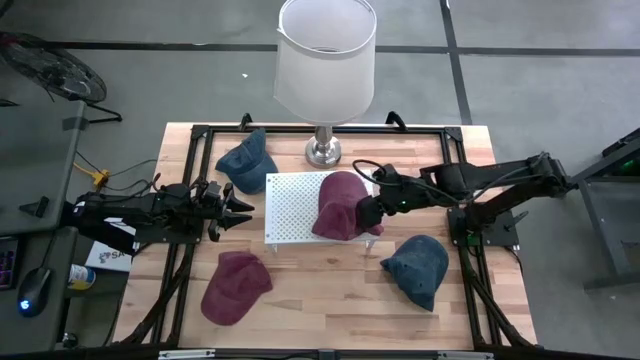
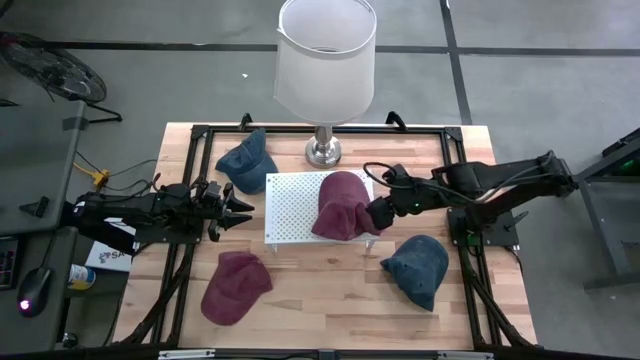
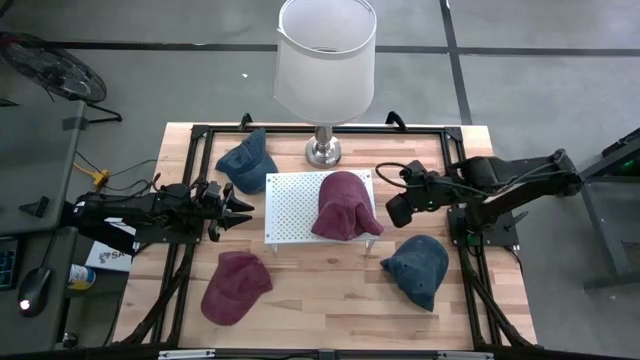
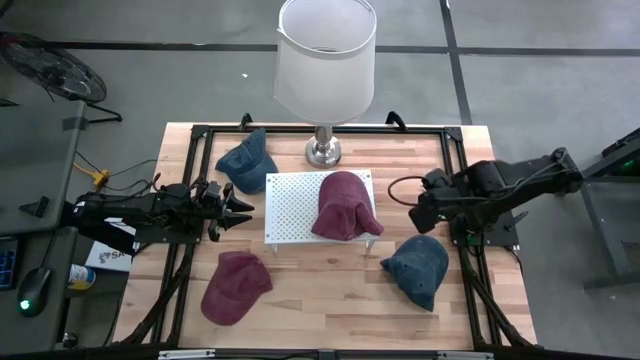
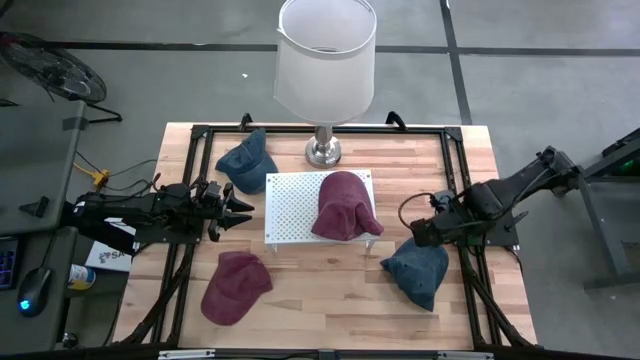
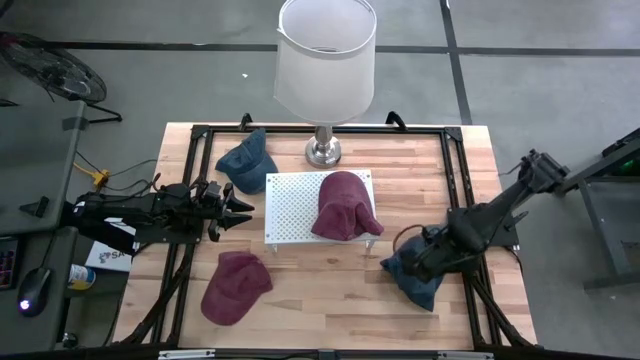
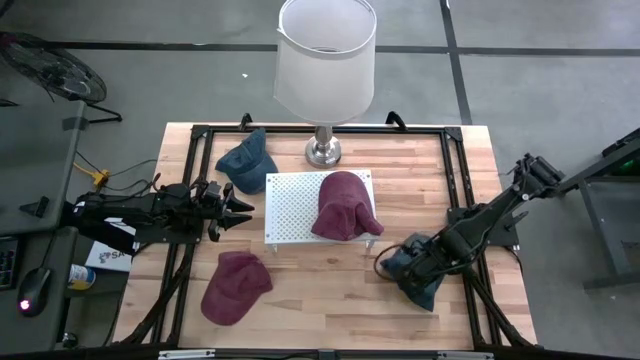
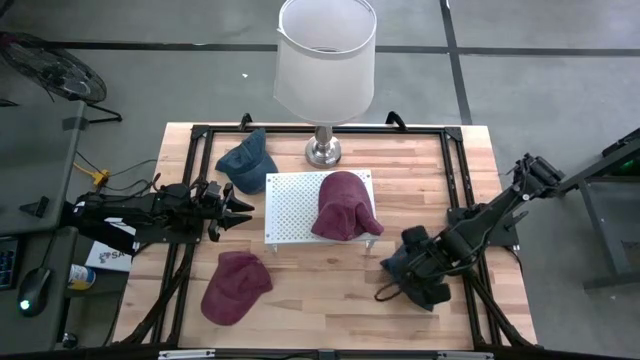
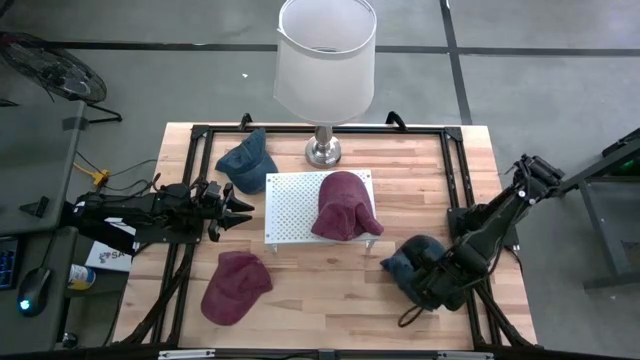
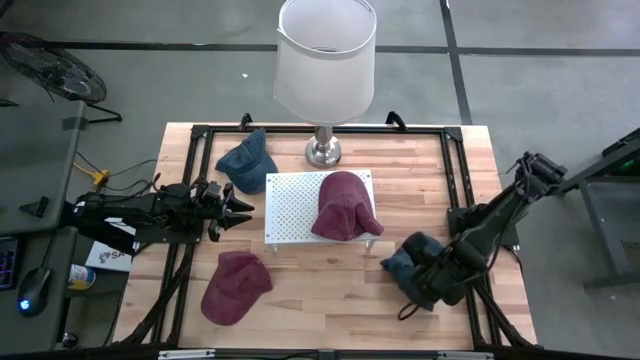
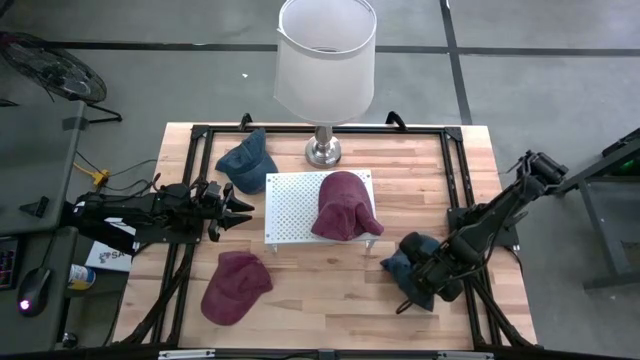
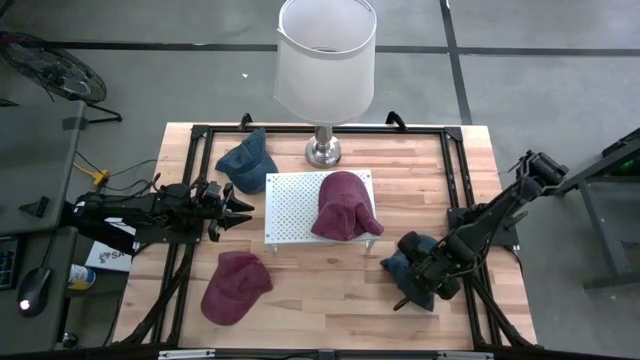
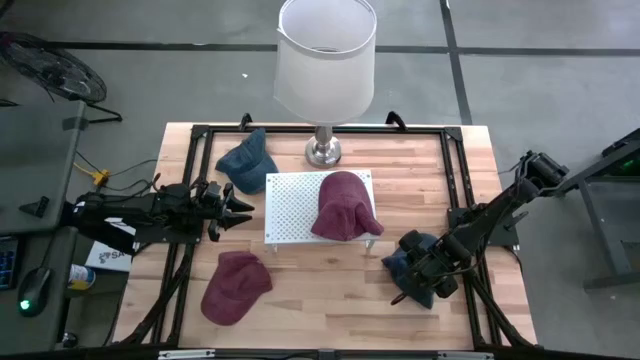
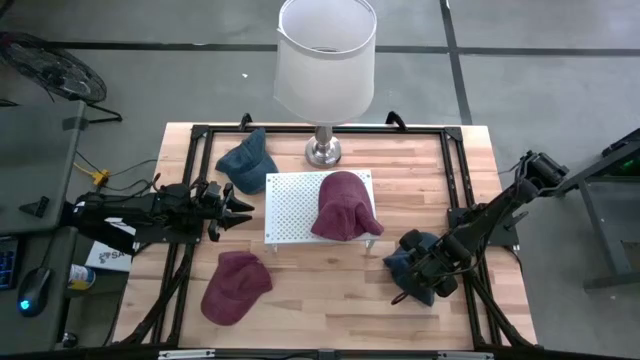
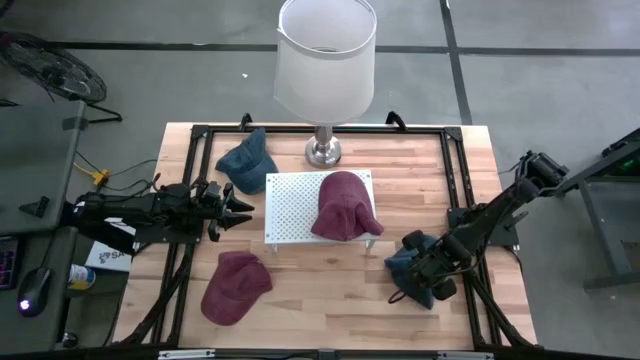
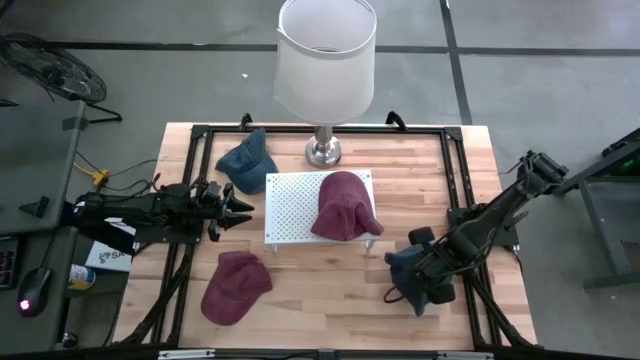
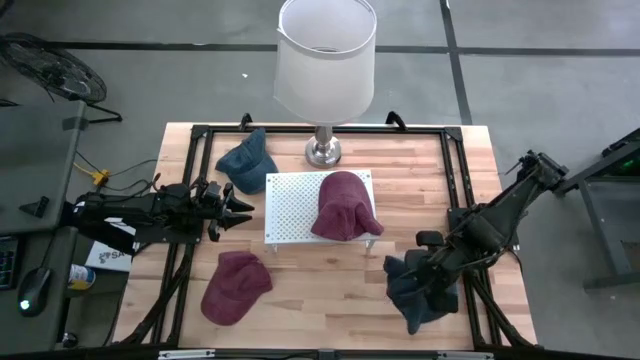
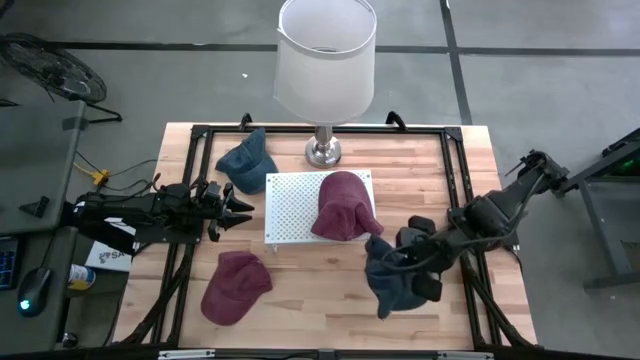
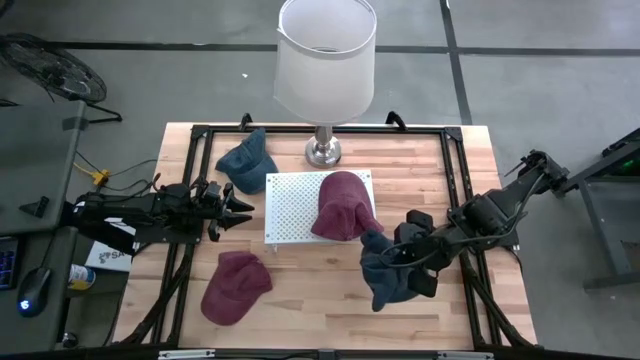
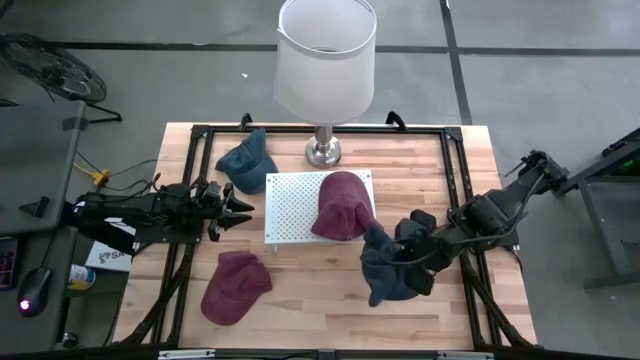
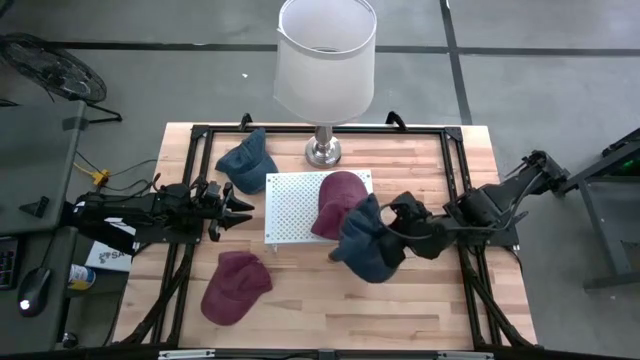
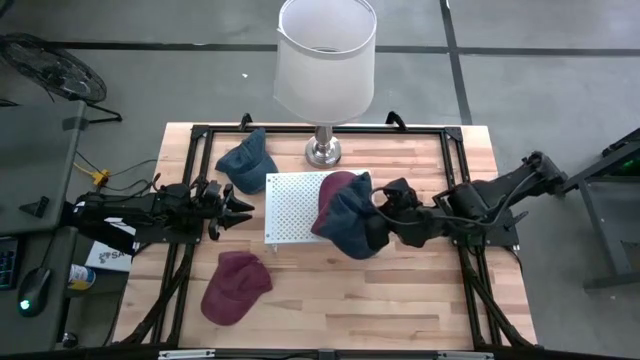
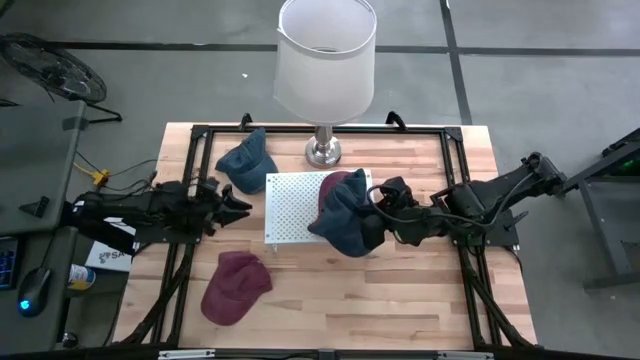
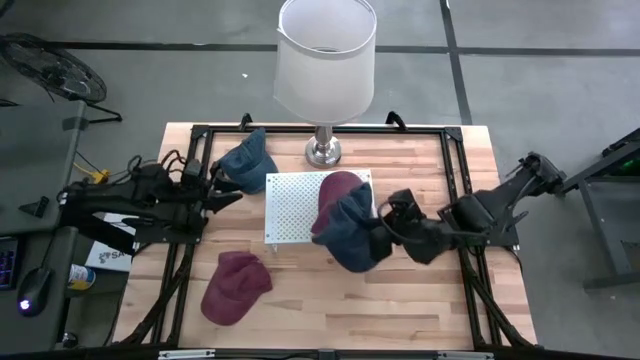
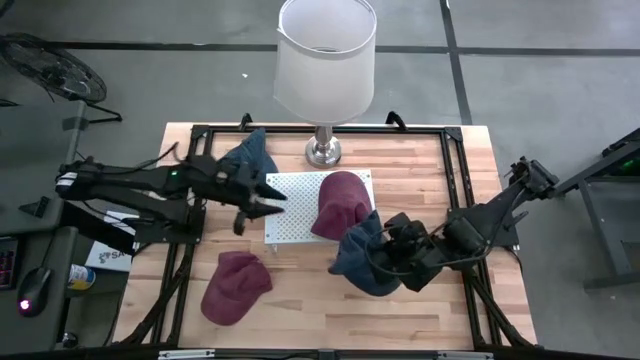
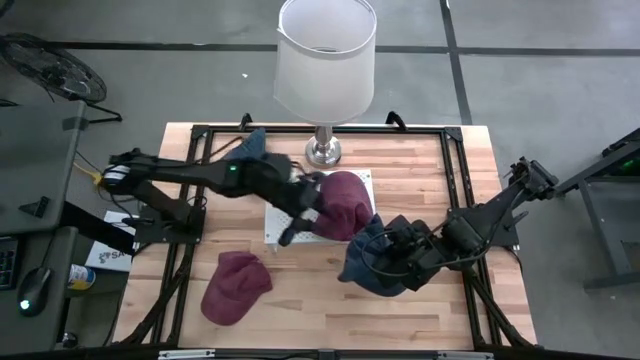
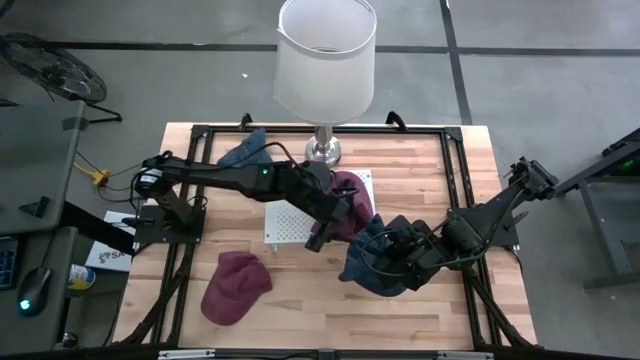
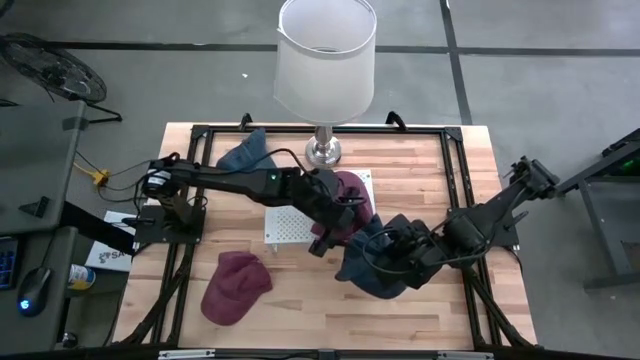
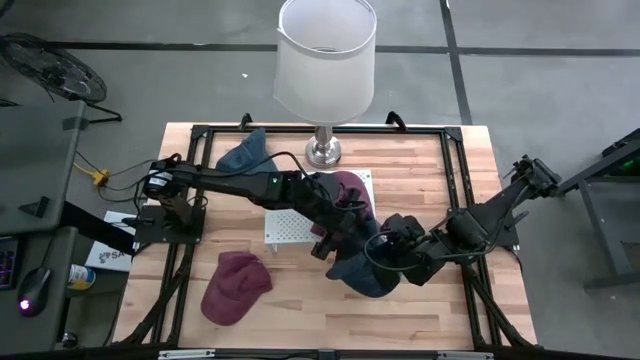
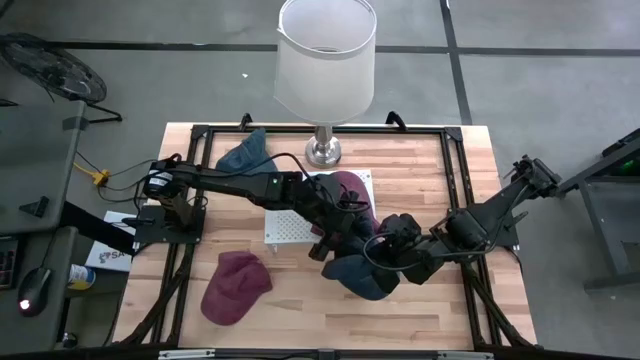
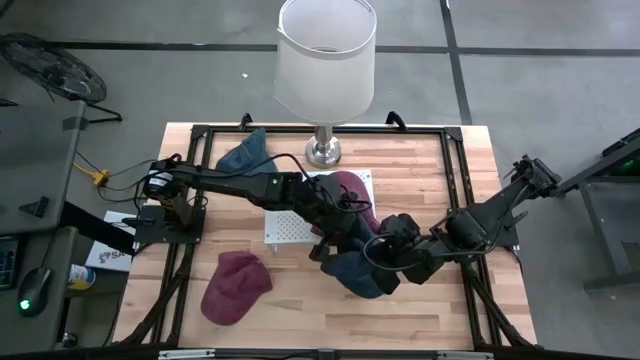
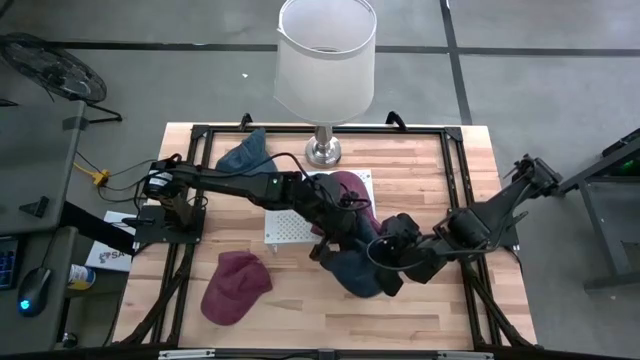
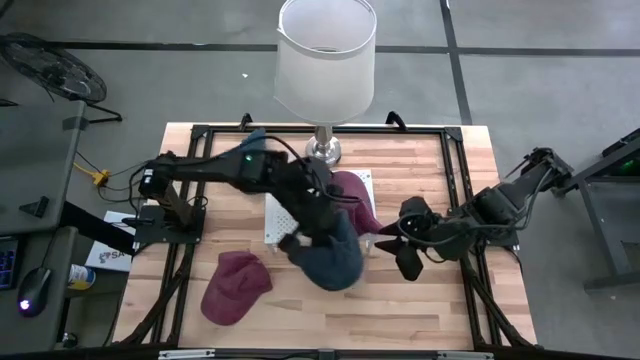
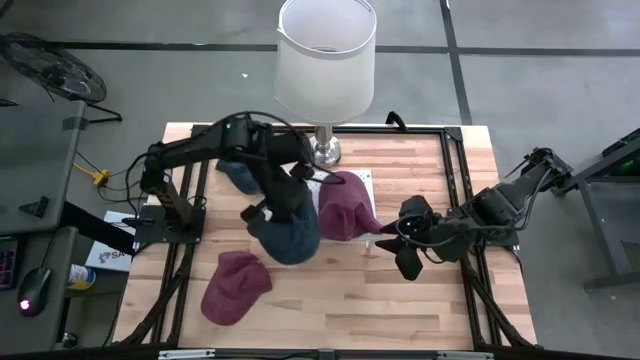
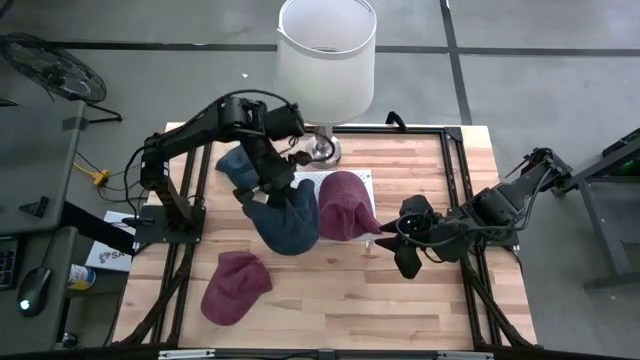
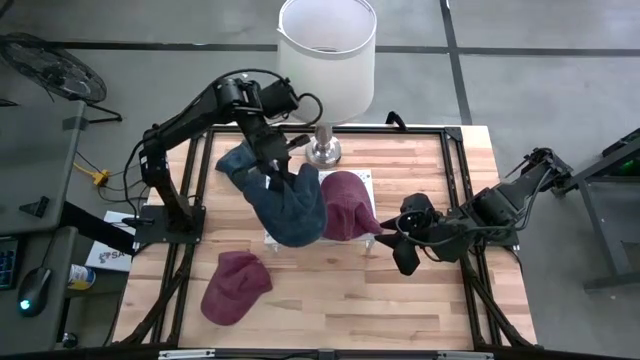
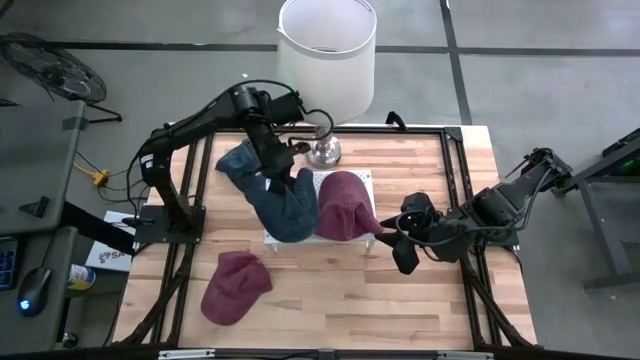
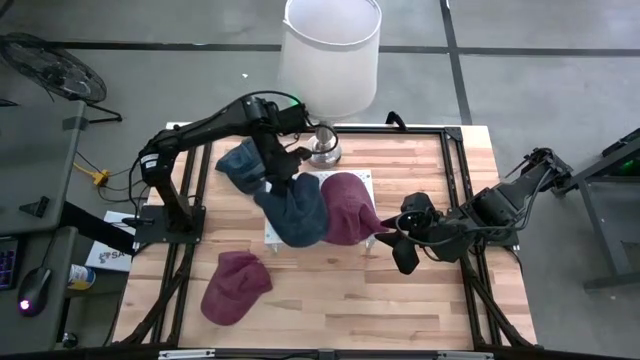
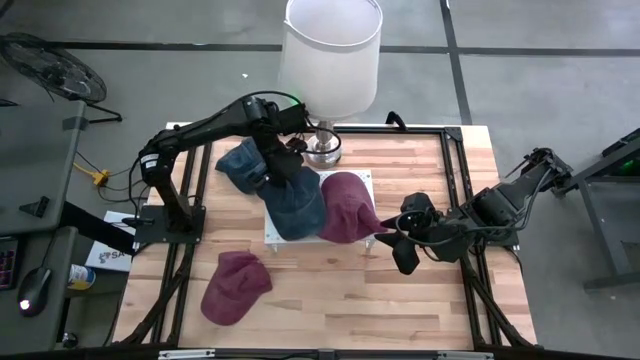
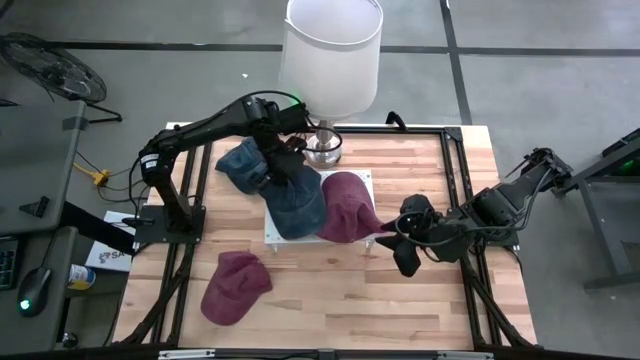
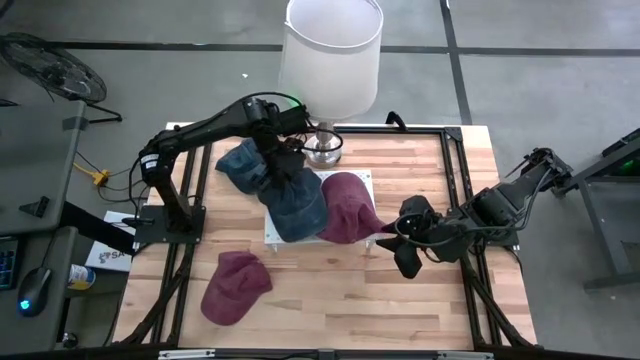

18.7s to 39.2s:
Task: Pick & Place hat
Put the bottom blue cap on the shelf

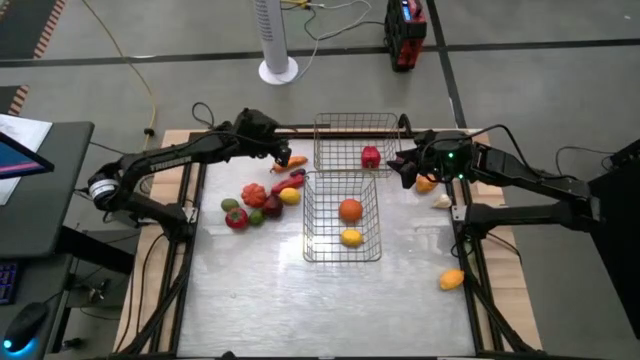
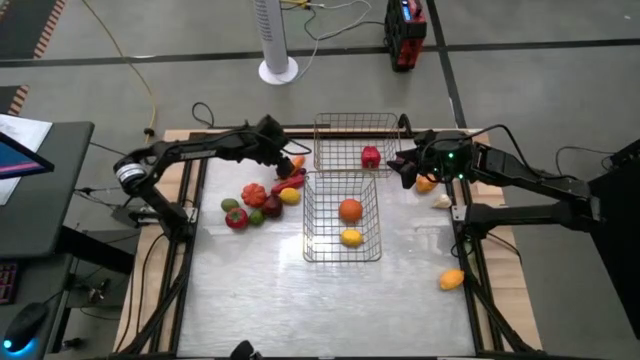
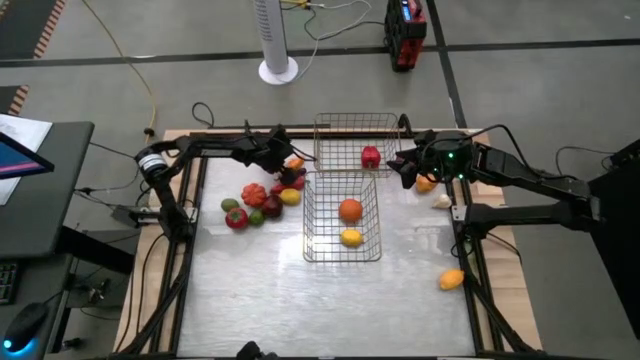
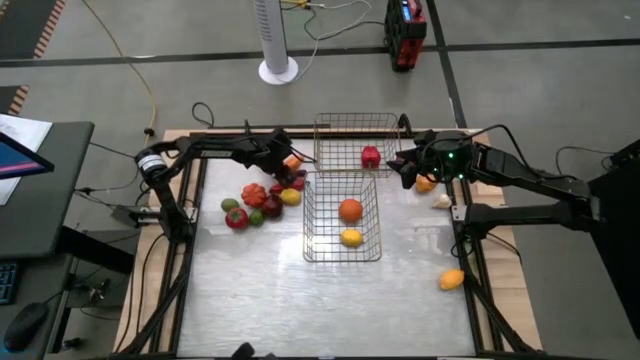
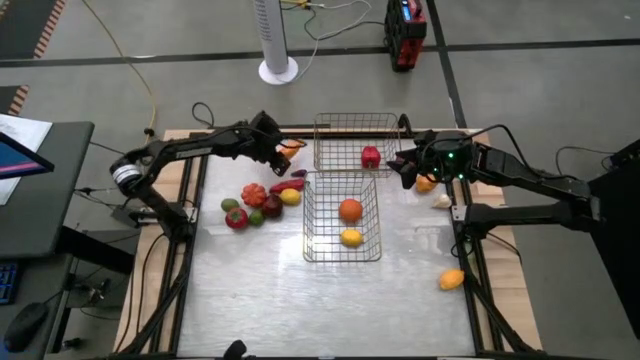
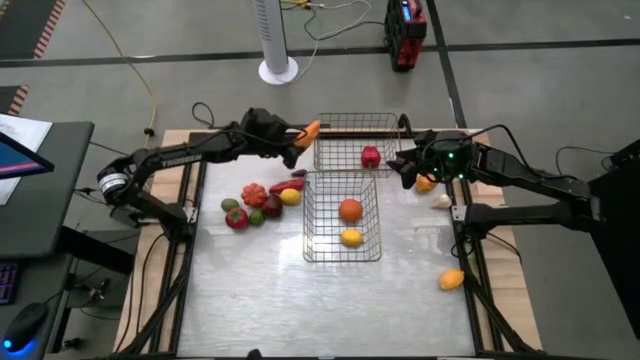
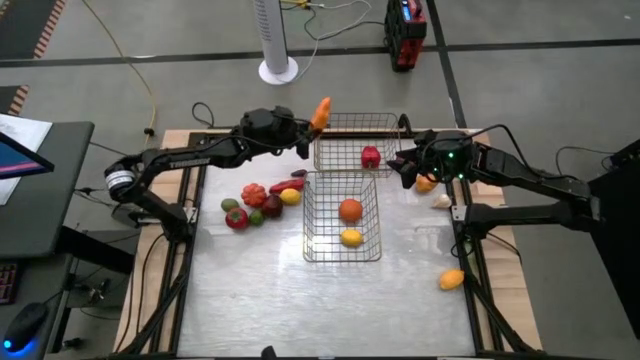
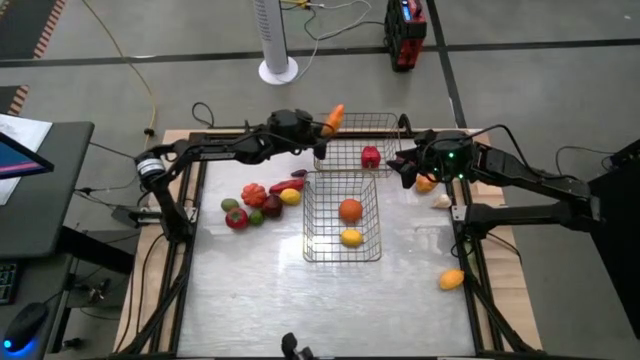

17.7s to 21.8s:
Task: Sort produce into baskets
Put the orange chili pepper into the top wire basket
